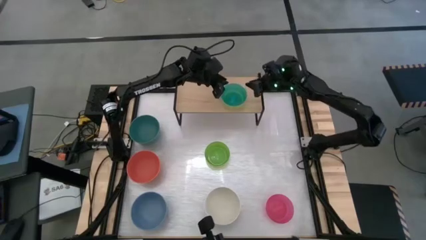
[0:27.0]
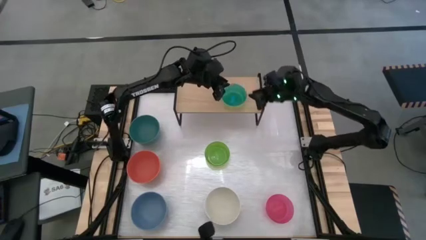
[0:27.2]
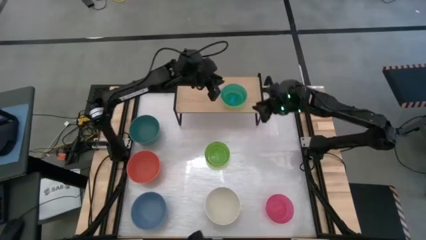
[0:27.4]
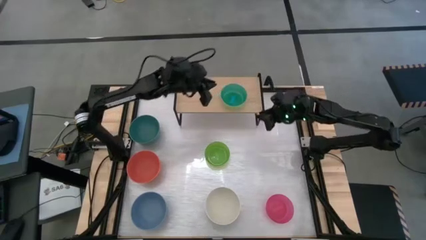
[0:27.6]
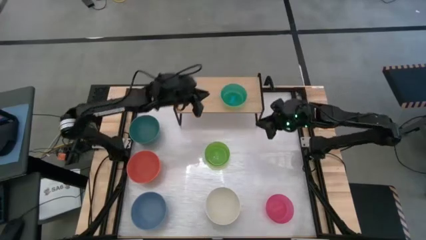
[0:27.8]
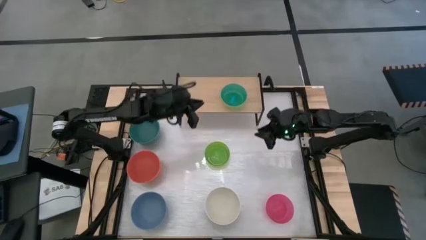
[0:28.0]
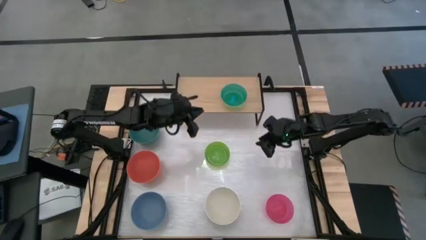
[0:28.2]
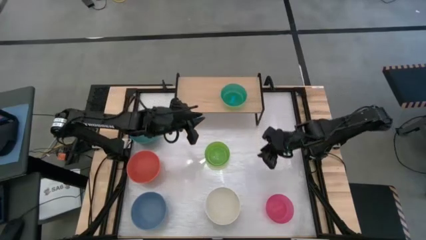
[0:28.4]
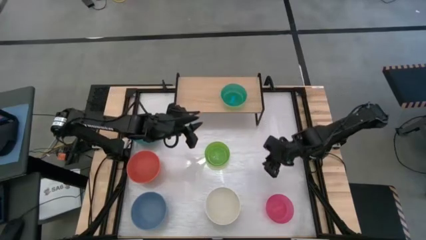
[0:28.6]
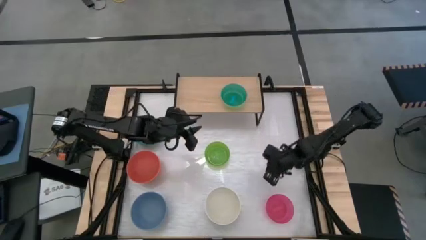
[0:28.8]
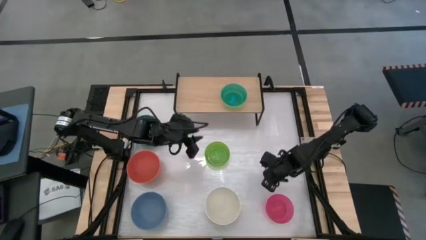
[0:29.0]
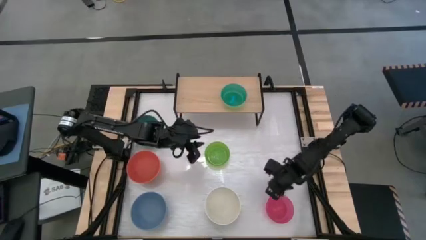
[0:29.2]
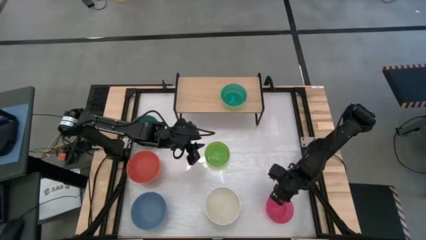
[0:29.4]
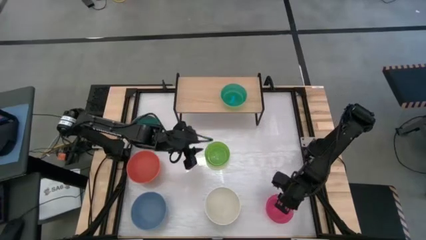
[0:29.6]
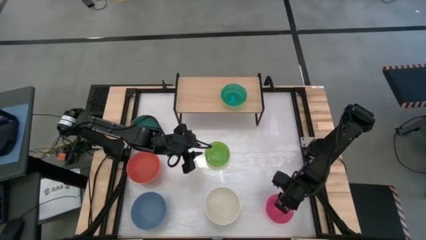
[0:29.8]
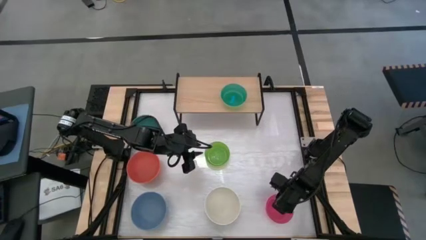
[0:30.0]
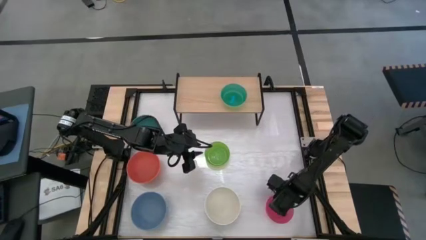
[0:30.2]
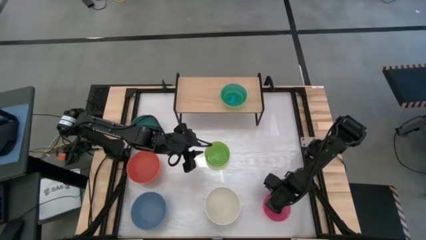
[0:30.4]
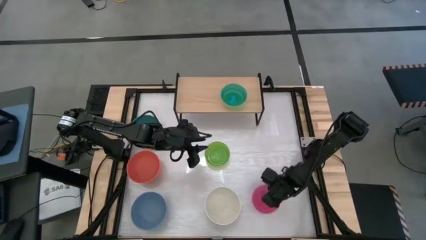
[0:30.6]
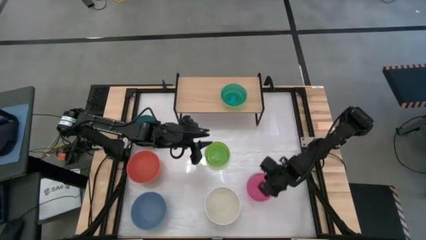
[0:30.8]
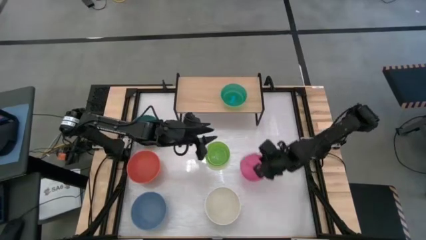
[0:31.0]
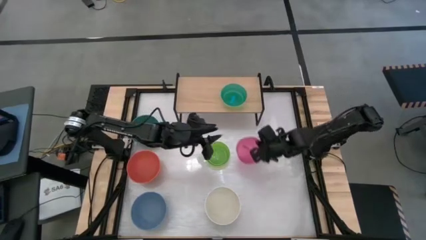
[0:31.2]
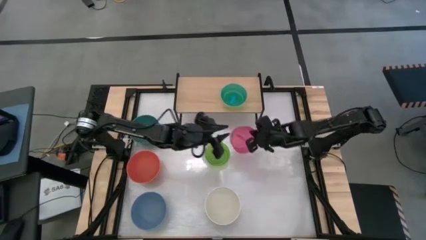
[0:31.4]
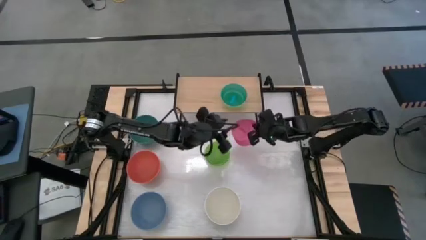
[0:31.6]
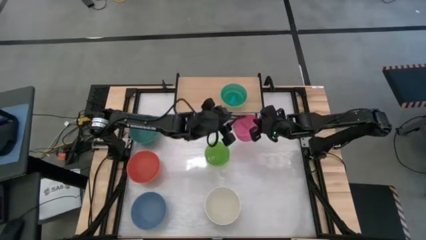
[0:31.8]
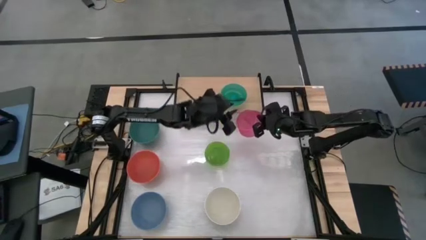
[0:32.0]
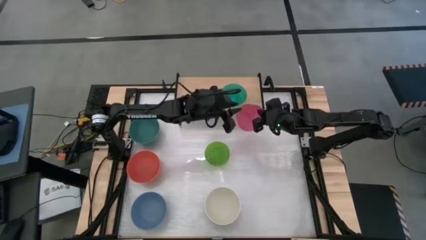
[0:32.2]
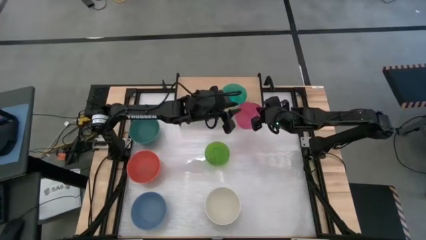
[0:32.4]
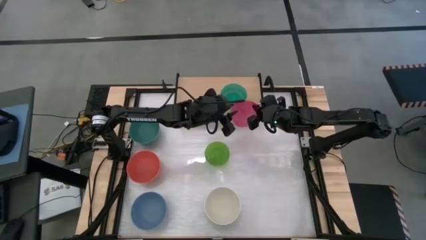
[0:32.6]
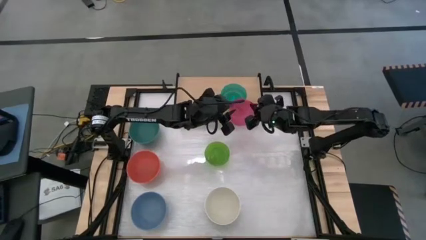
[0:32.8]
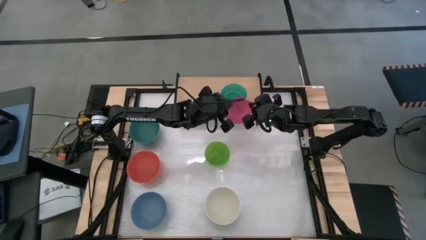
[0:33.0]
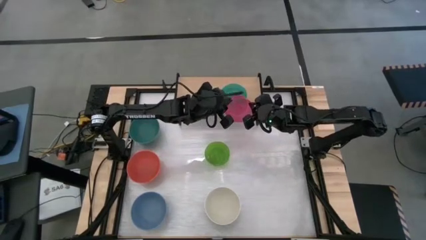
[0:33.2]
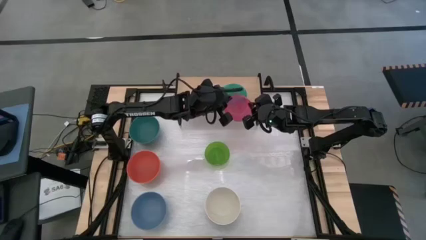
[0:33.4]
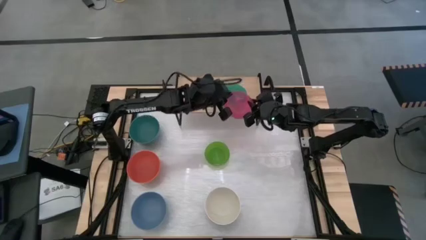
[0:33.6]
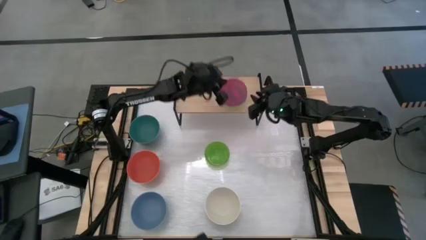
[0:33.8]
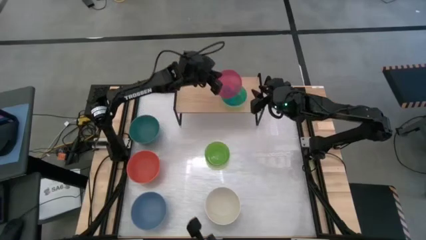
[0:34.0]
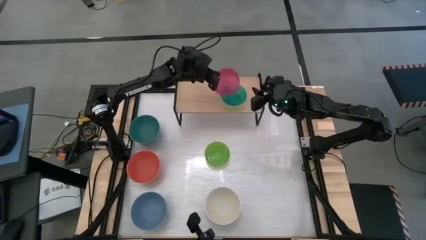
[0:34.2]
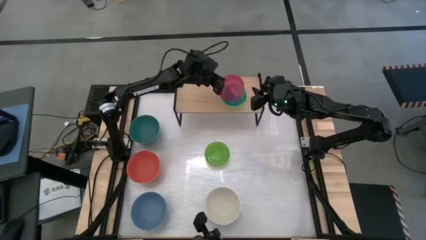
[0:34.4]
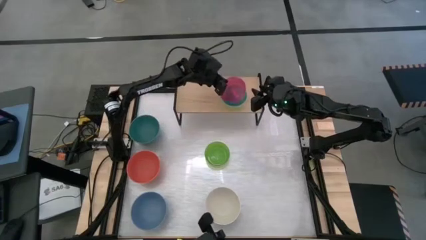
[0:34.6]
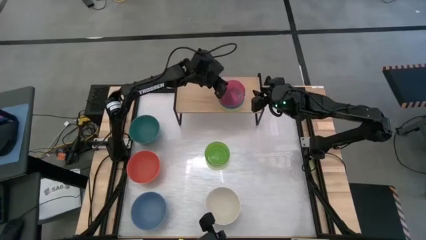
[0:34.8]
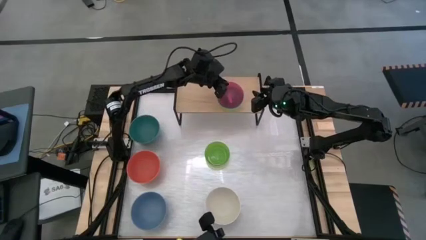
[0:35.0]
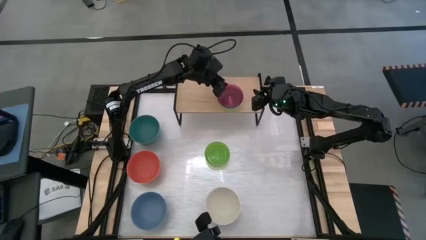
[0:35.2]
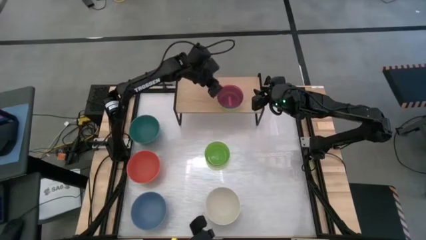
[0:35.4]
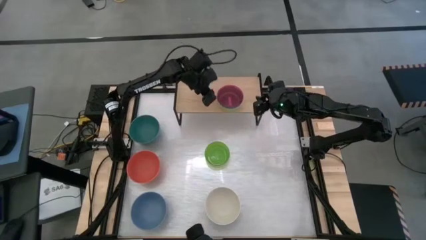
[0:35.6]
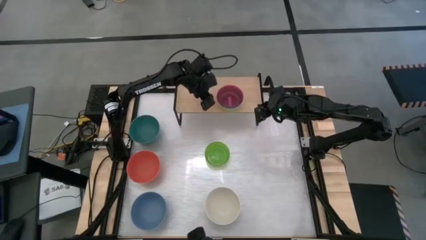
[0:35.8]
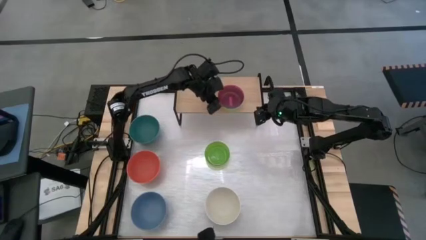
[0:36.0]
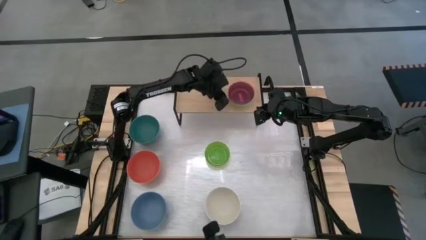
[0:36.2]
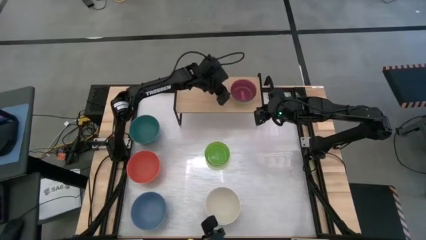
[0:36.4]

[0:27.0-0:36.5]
Task: Place and stack bowls onto a shelf
Stack the red bowl on top of the light blue bowl on the shelf

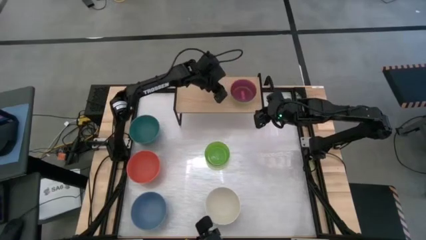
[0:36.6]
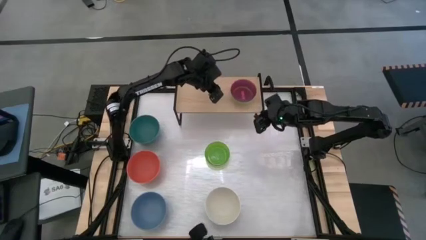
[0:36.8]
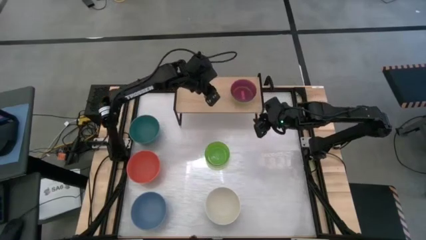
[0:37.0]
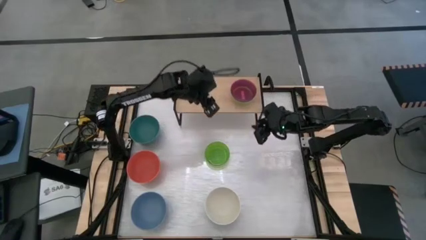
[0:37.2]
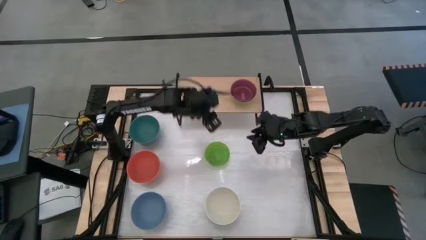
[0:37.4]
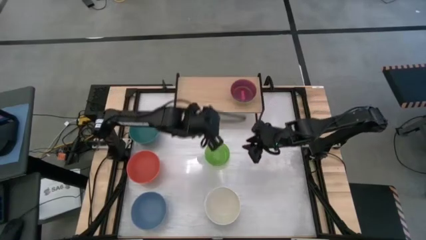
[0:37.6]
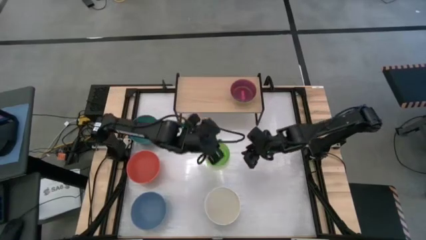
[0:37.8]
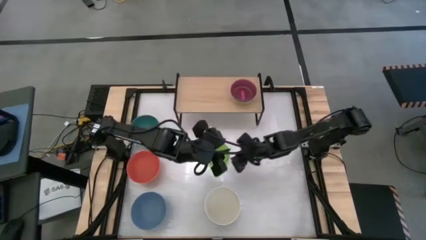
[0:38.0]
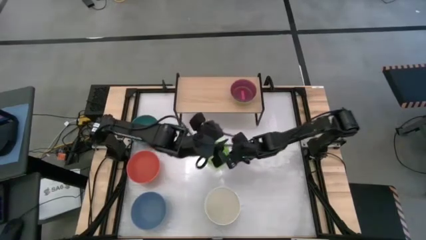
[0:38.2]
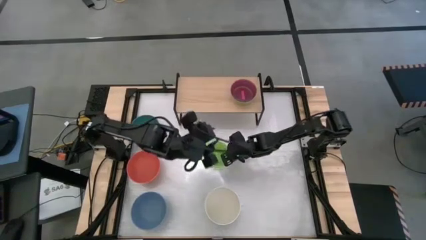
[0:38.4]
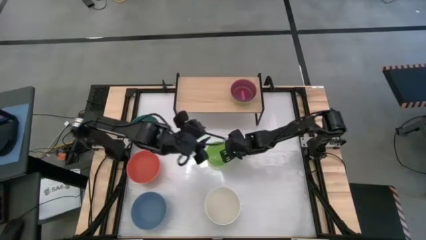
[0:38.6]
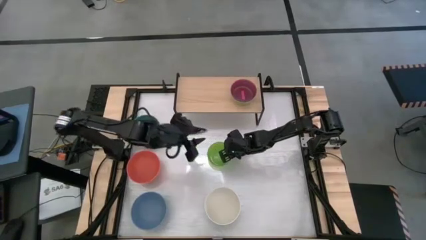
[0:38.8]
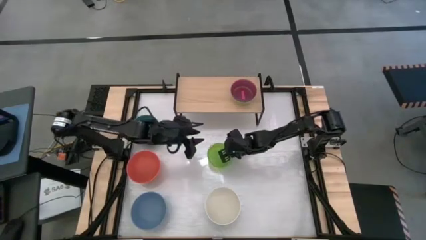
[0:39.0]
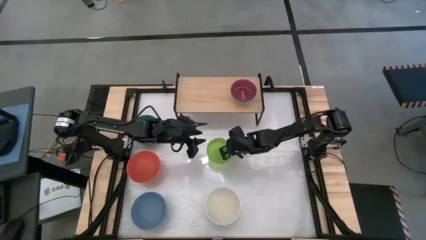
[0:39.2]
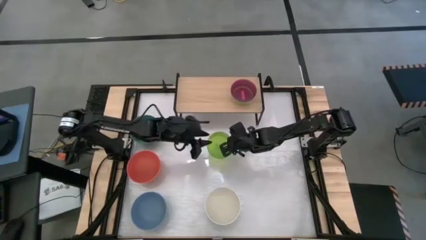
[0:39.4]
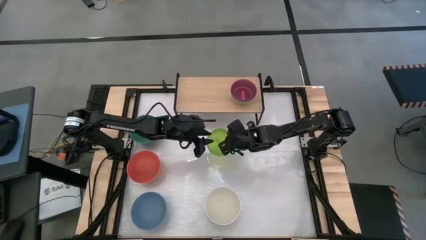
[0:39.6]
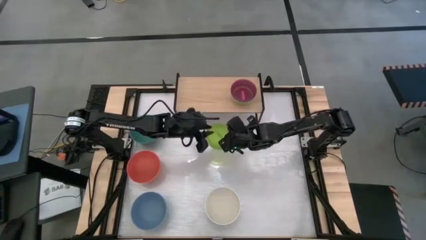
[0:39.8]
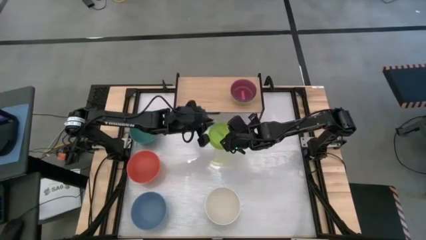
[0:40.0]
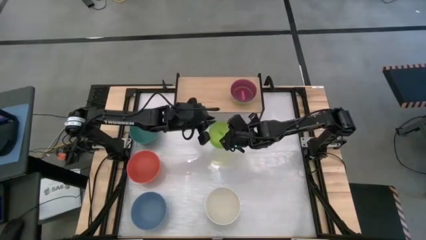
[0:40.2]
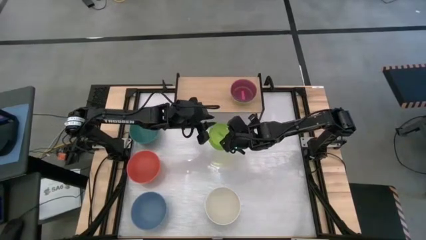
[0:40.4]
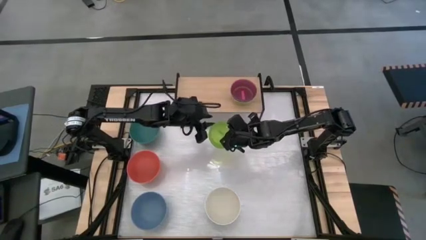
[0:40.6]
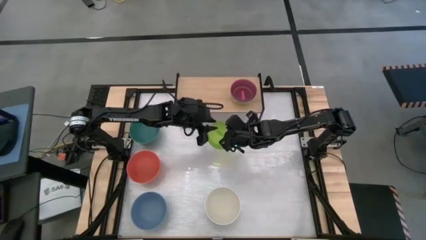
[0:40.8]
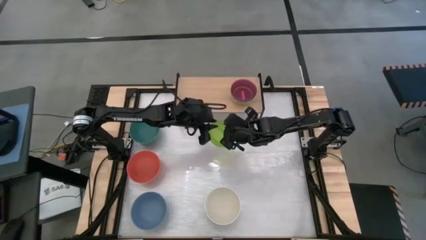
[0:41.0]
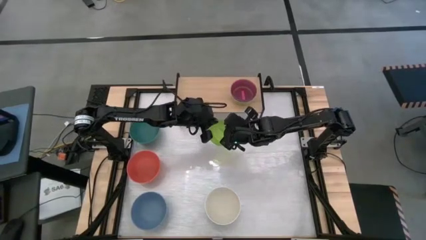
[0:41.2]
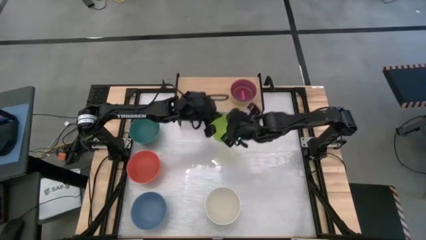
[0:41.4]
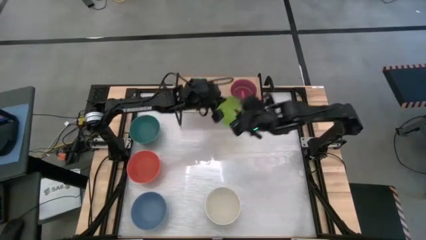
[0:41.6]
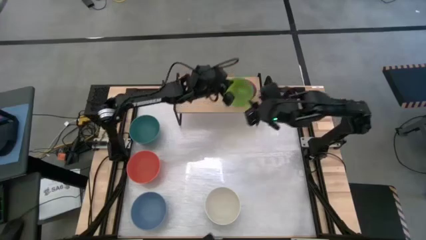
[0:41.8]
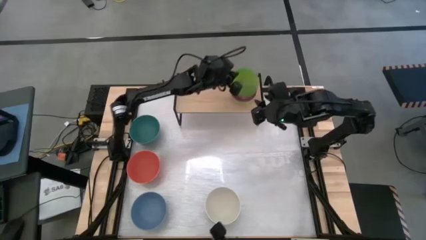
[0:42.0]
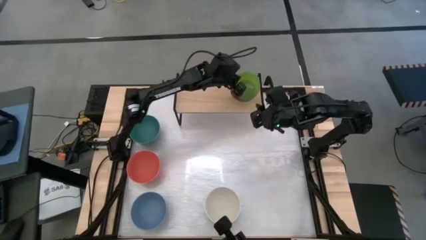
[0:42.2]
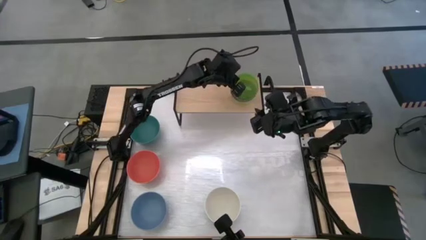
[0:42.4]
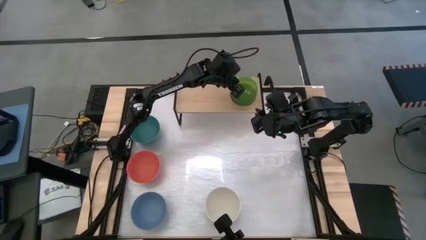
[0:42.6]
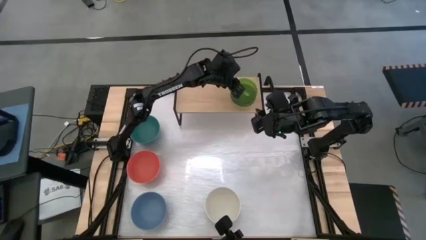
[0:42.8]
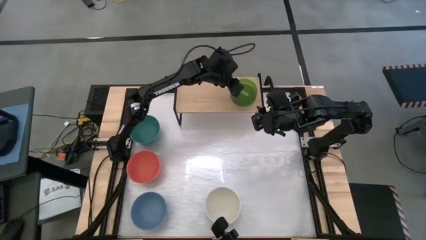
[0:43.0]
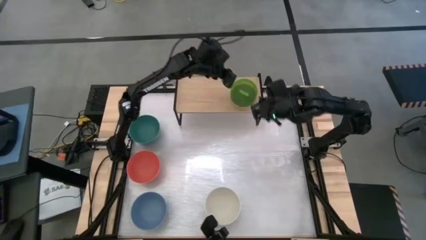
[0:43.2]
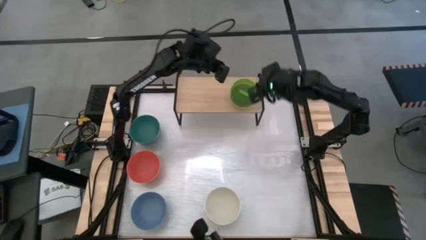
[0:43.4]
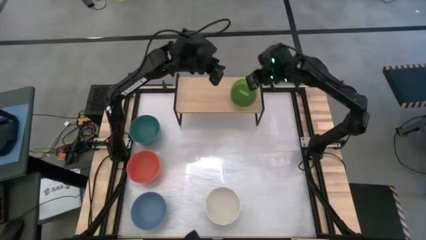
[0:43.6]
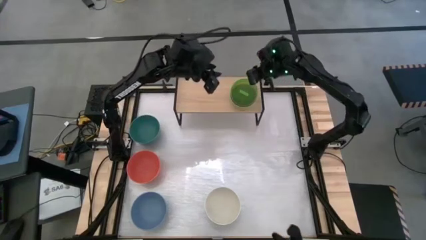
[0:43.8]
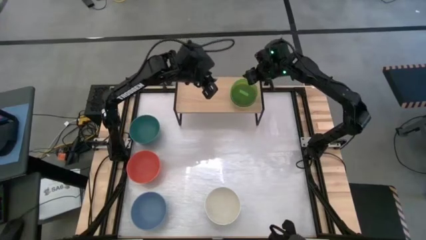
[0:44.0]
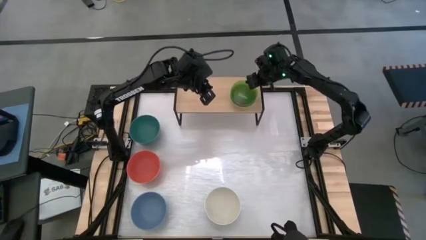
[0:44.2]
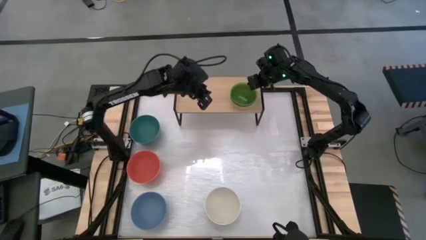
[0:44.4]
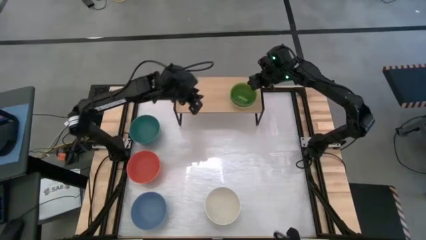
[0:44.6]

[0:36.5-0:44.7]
Stack the light green bowl on top of the red bowl on the shelf
